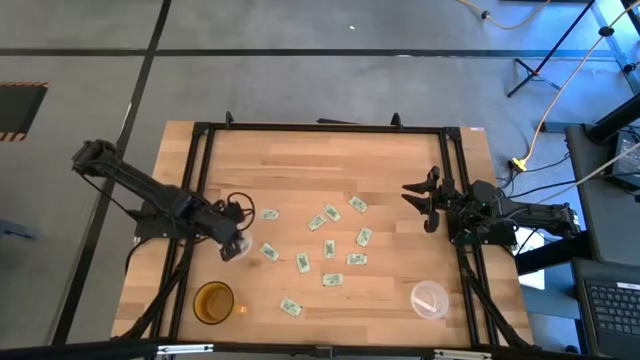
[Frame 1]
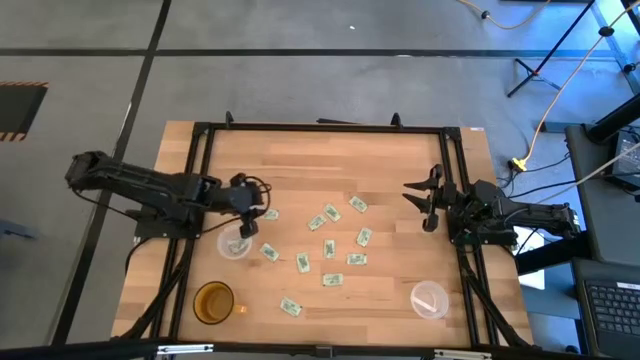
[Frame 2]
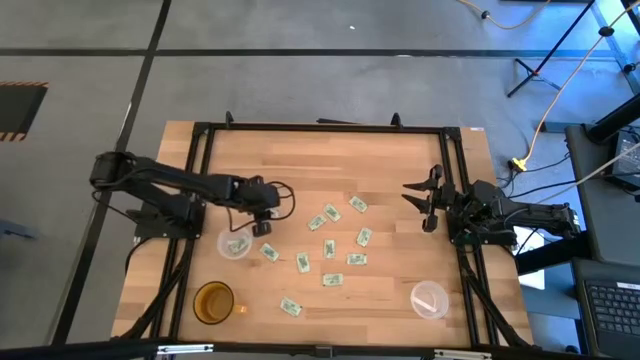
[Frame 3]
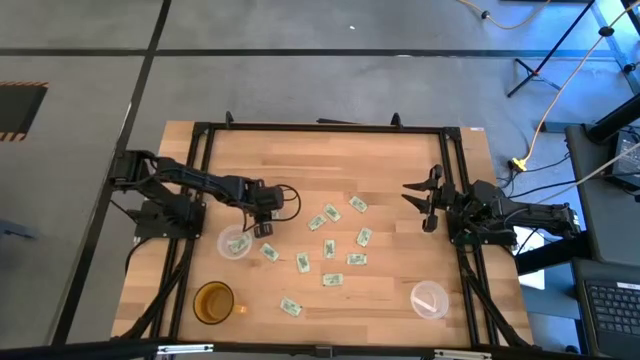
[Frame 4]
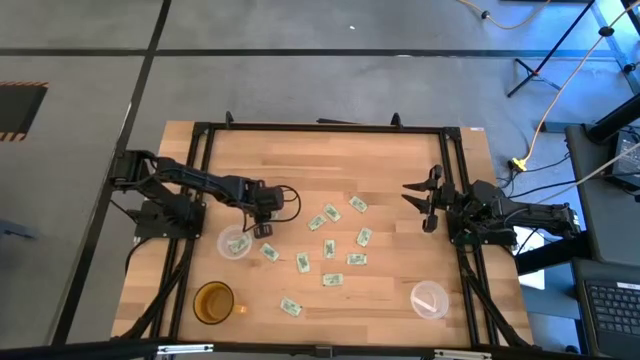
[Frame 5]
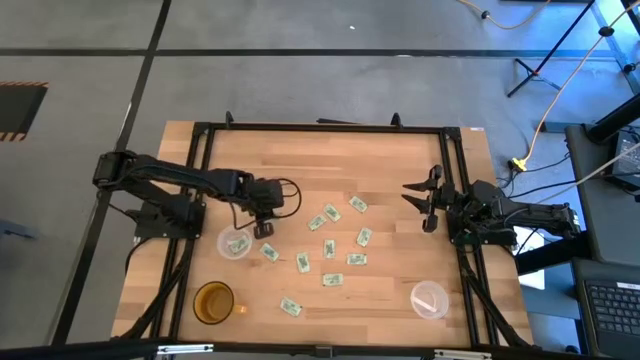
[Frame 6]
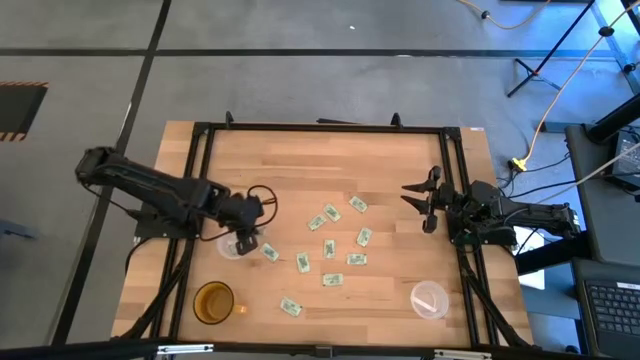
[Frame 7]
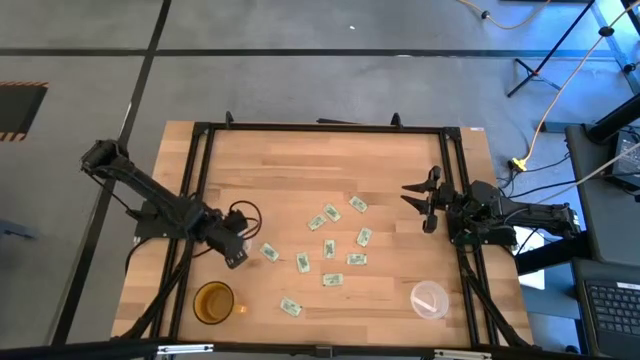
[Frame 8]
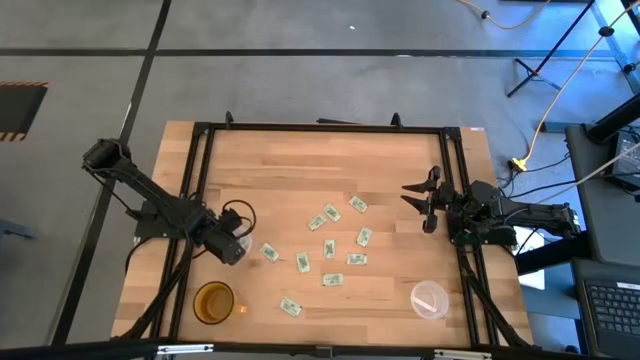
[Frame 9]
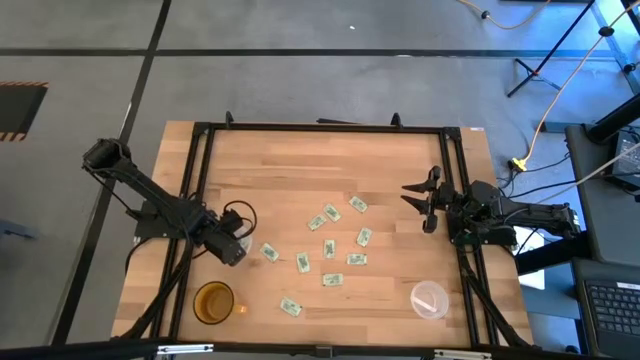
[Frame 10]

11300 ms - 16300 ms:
Task: Pick and place items into bin
Put the green stevia packet into the left transparent bin

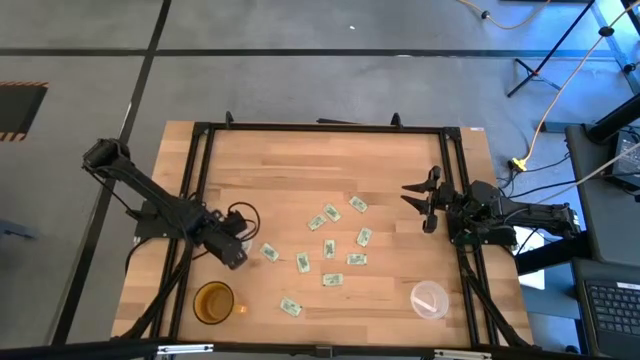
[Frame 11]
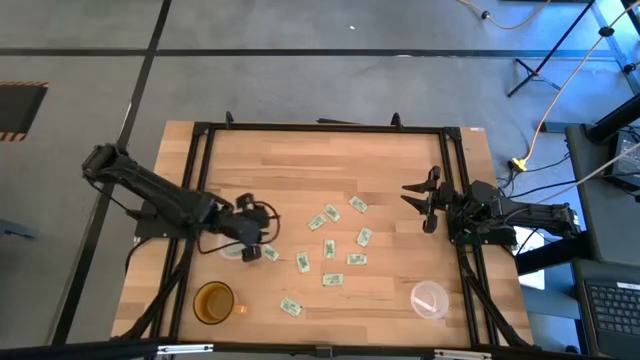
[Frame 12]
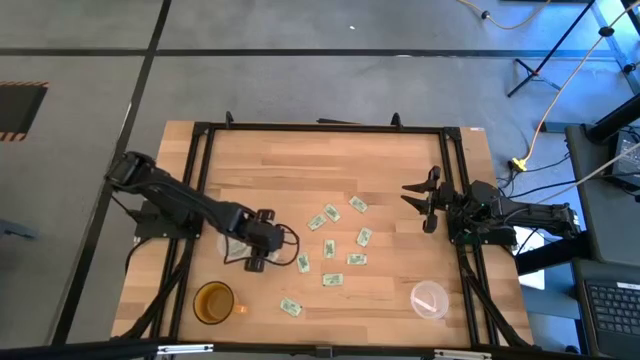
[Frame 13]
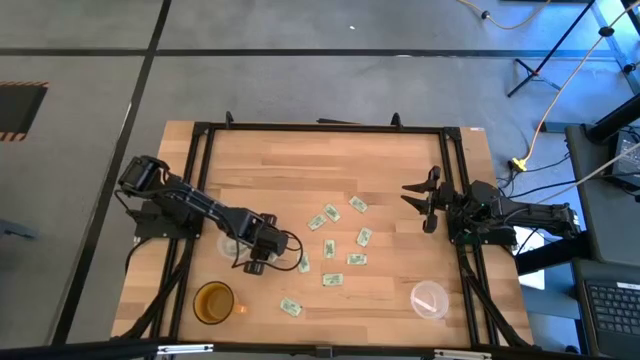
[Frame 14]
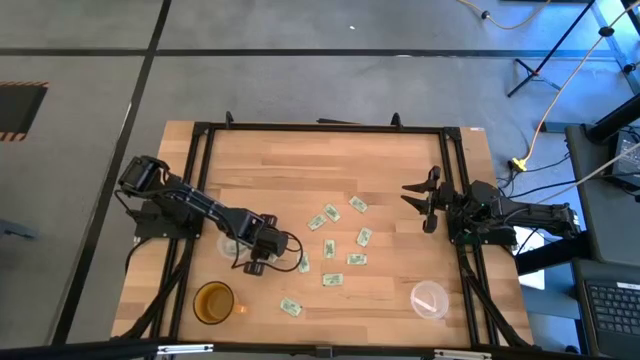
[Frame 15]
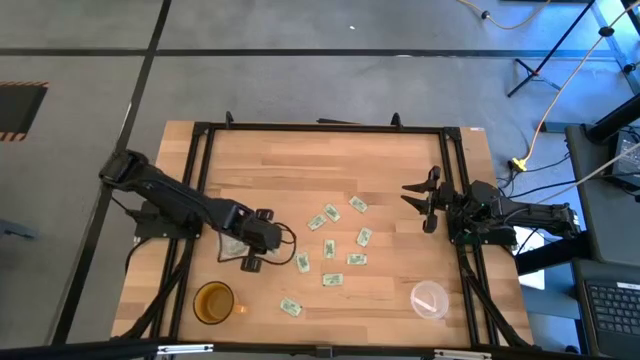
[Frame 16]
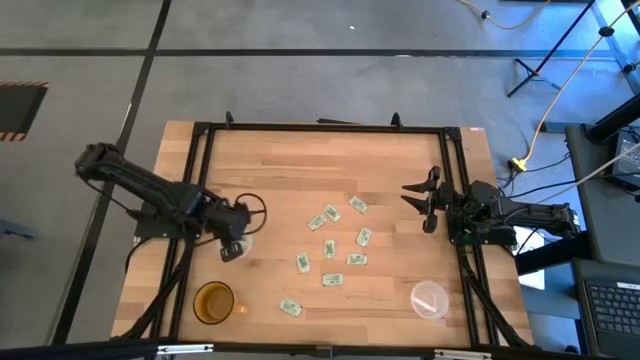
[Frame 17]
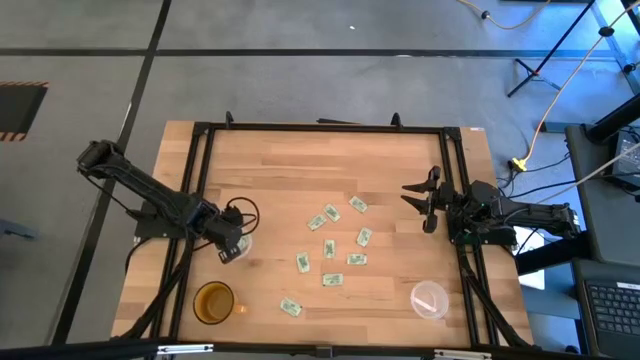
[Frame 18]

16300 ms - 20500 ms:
Put the green stevia packet into the left transparent bin

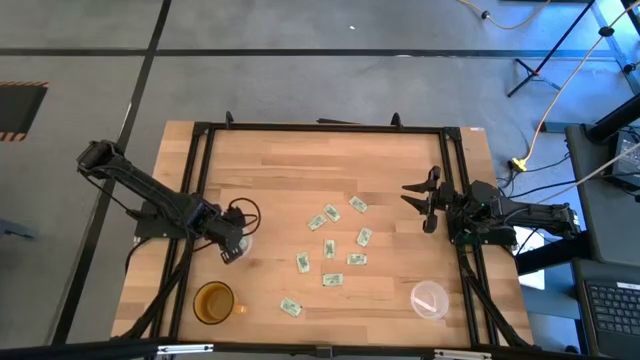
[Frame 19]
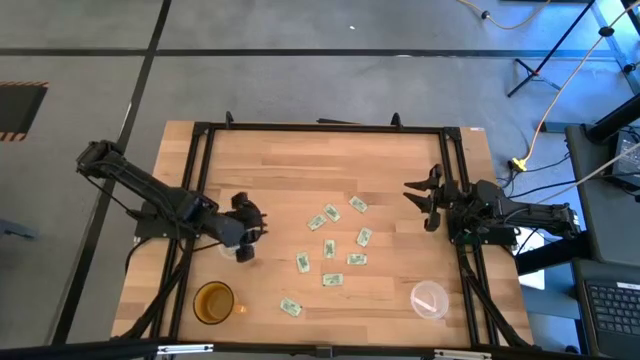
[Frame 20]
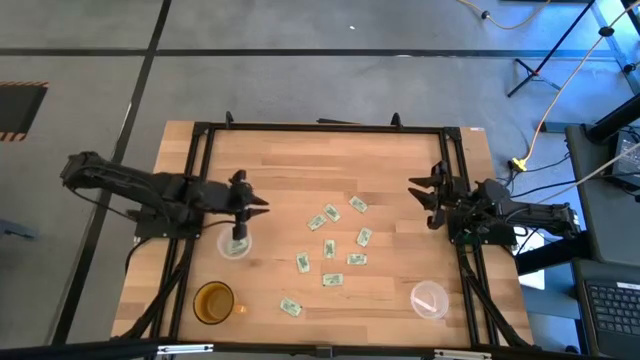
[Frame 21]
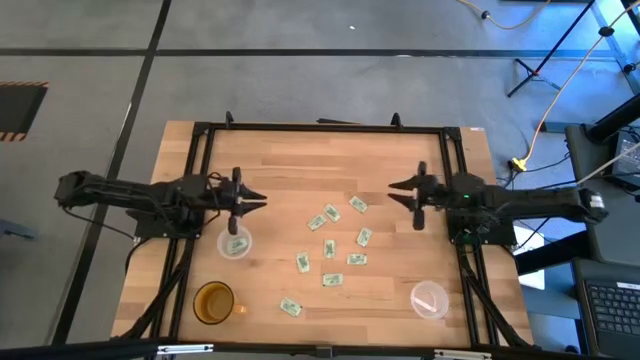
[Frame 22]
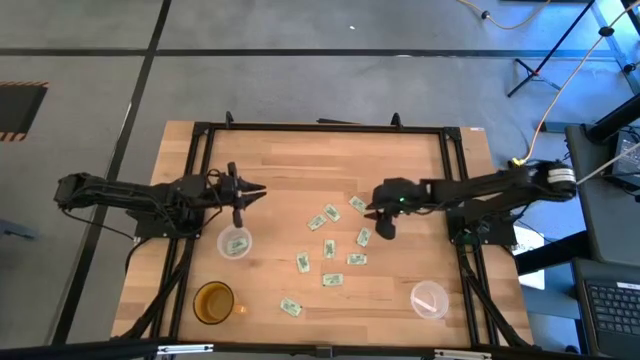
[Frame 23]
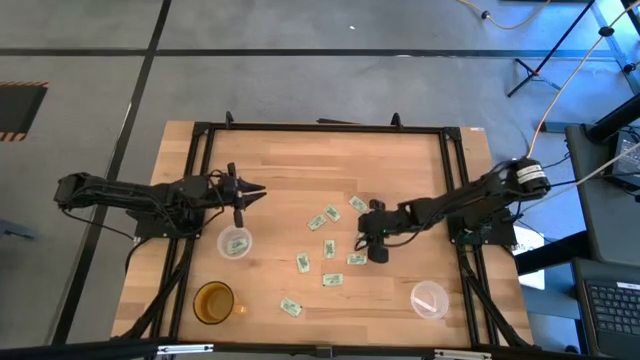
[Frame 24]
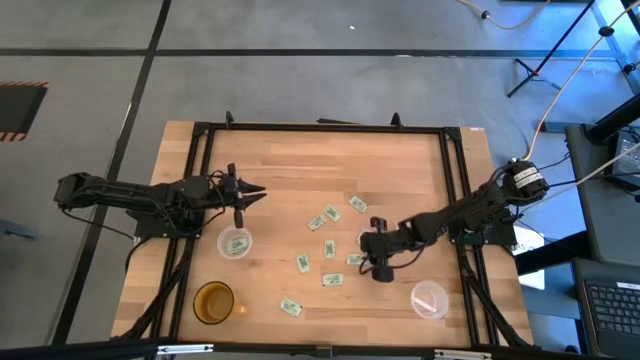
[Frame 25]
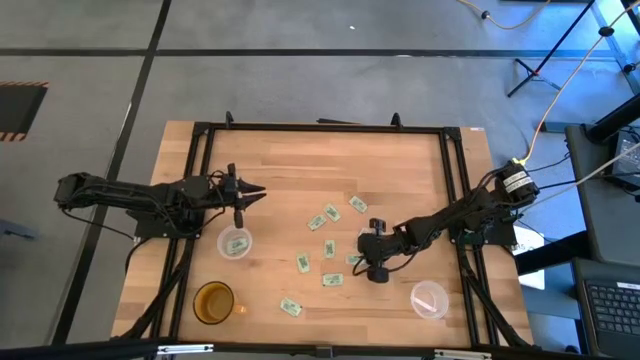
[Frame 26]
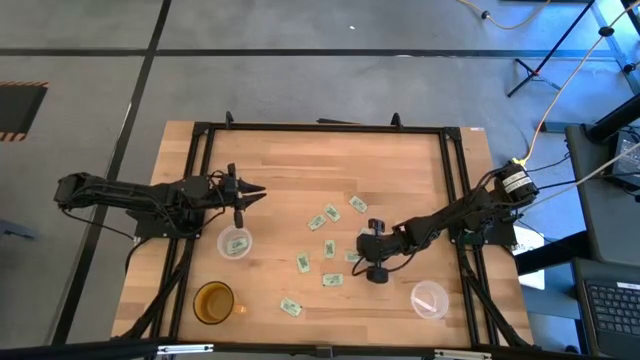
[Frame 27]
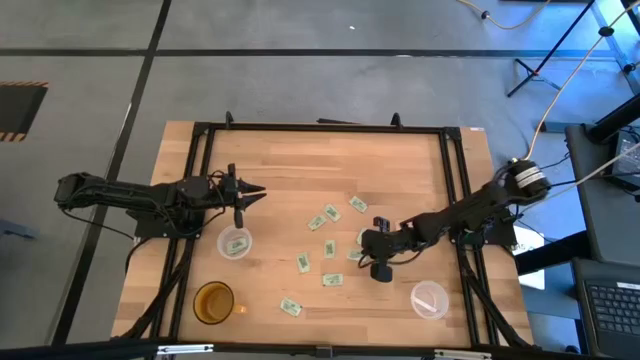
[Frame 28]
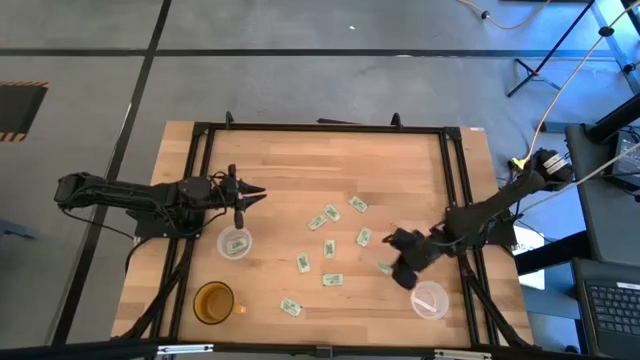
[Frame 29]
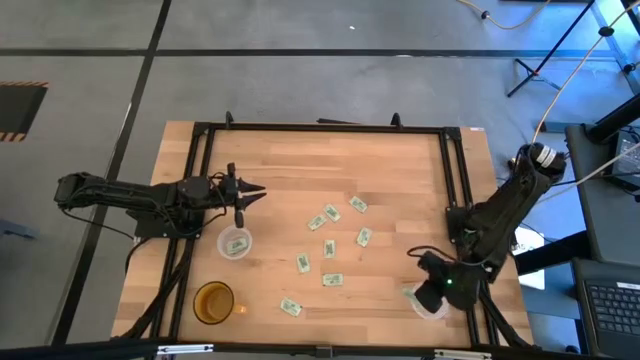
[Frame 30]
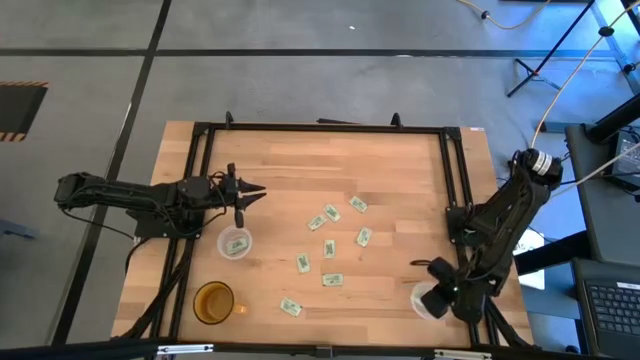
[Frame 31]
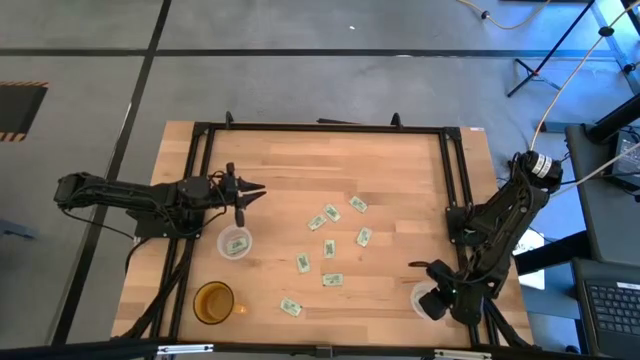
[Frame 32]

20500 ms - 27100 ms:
Put the green stevia packet into the right transparent bin

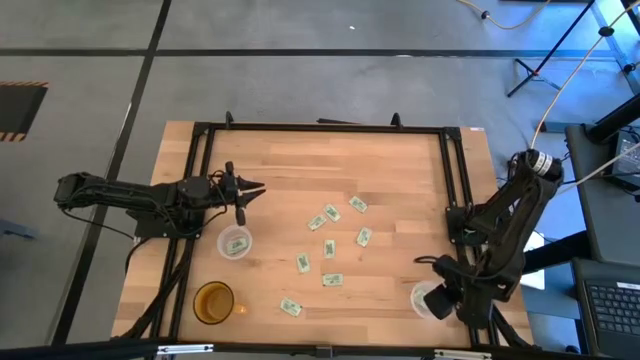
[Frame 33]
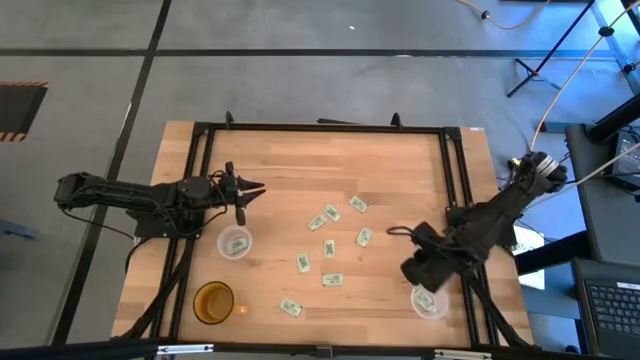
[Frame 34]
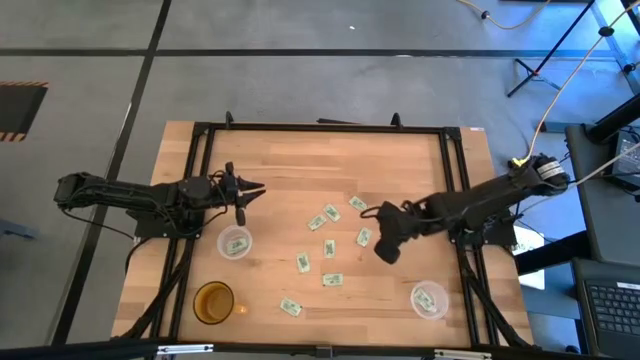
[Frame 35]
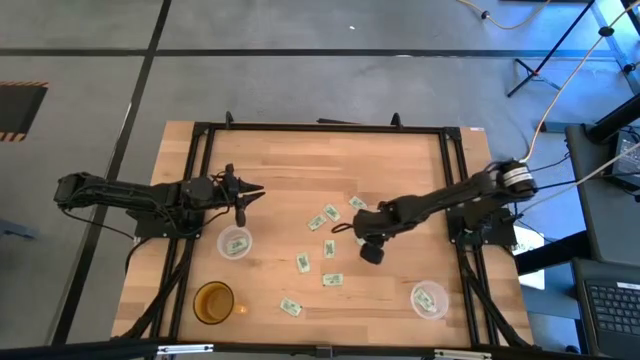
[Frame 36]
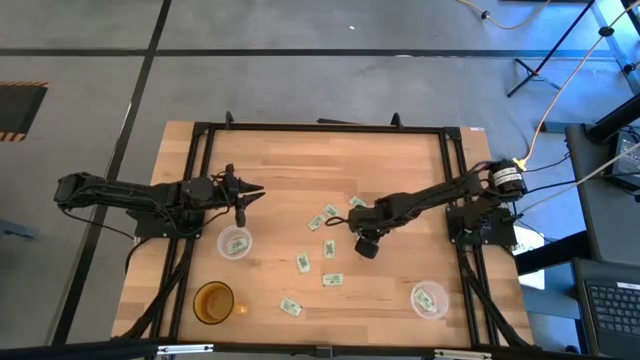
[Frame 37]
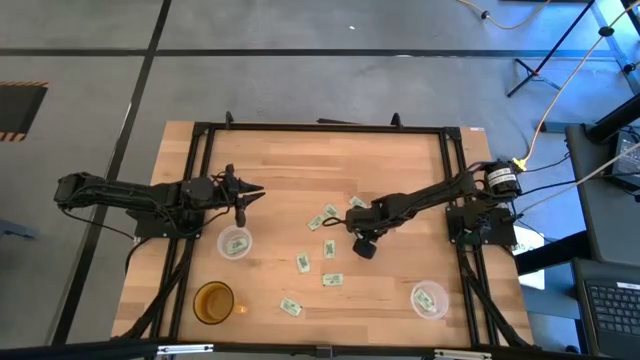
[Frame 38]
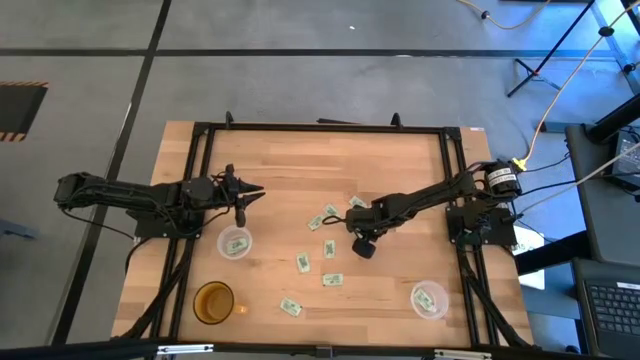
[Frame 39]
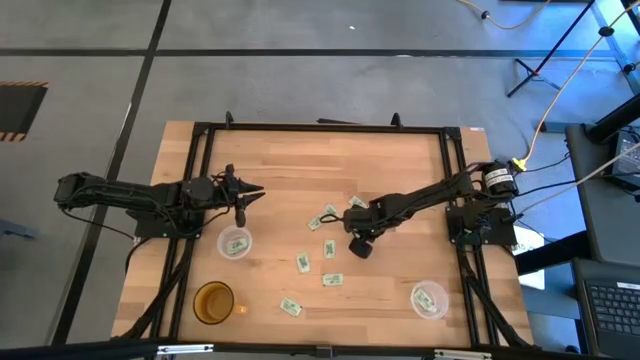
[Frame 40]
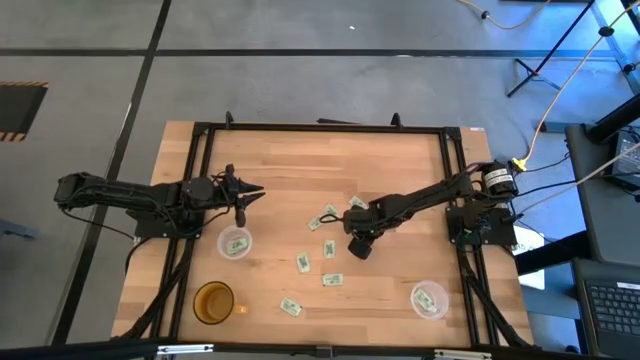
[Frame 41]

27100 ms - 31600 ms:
Put the green stevia packet into the right transparent bin

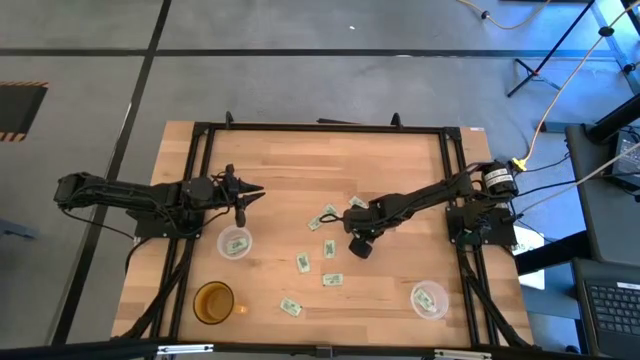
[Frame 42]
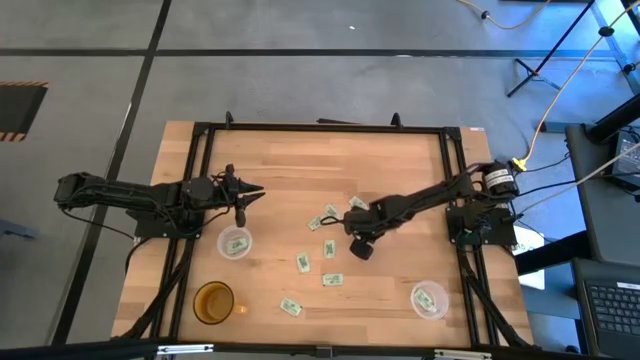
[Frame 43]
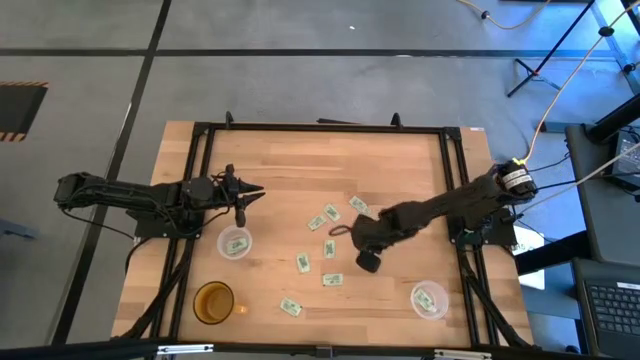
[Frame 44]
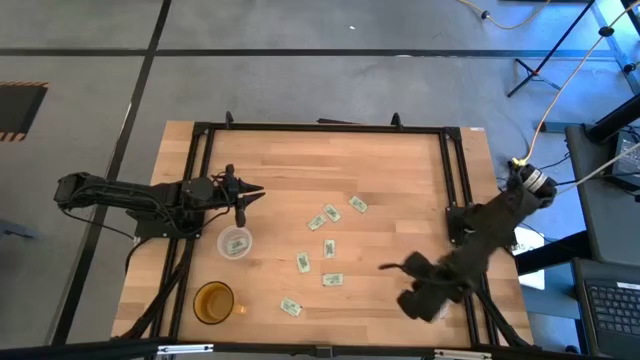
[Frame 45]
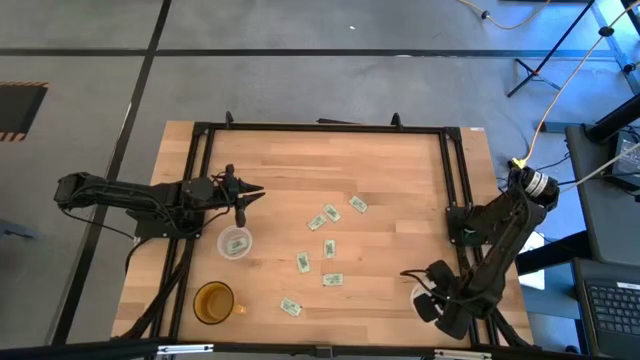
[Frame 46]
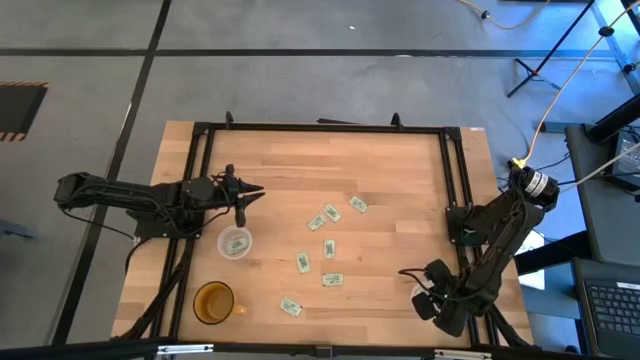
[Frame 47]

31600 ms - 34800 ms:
Put the green stevia packet into the right transparent bin
